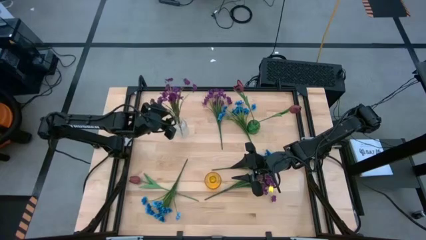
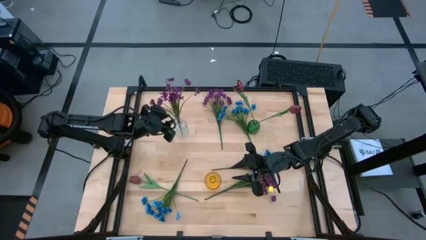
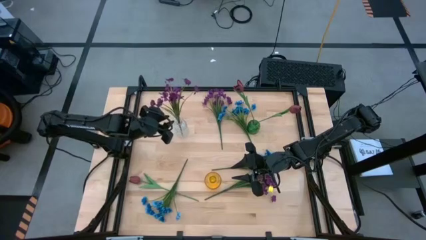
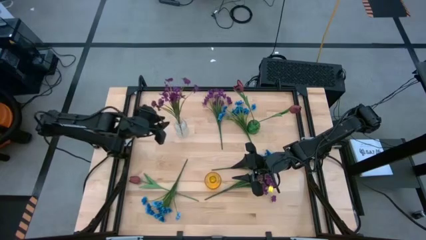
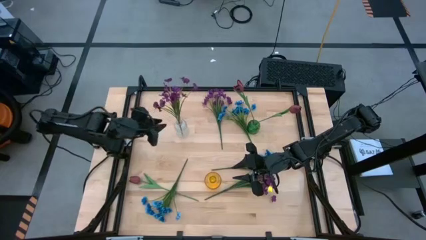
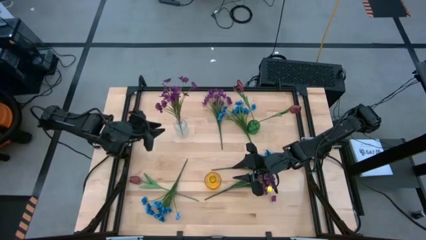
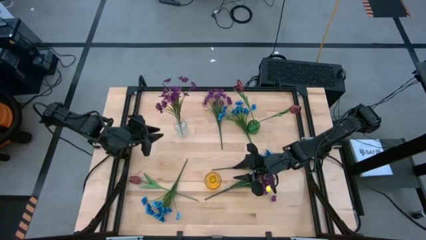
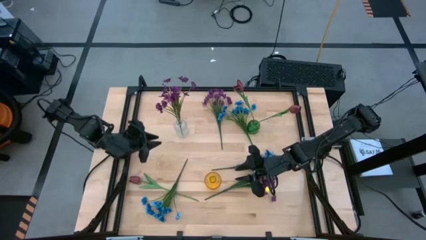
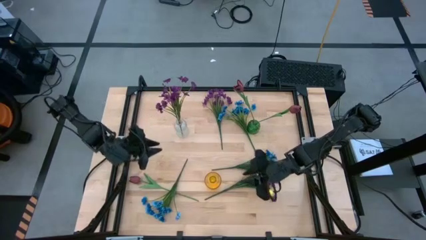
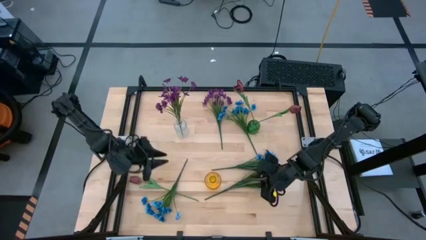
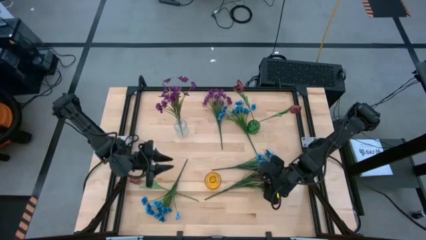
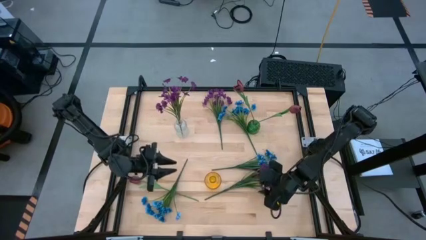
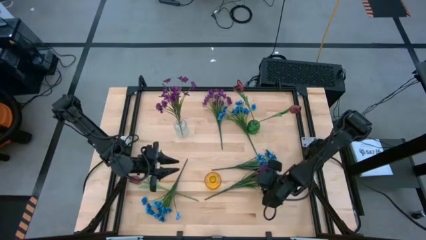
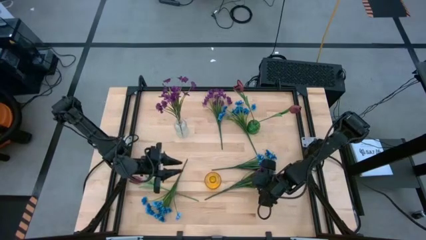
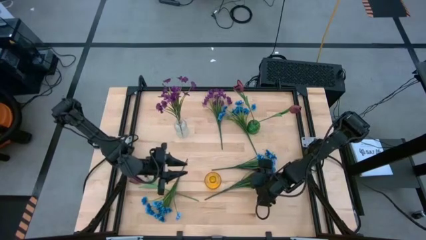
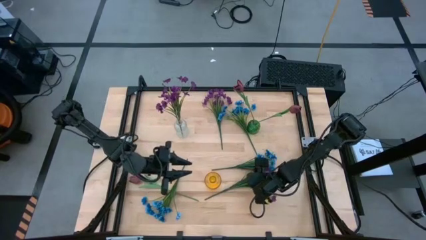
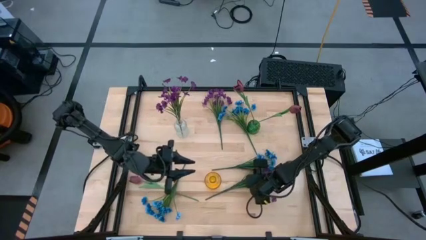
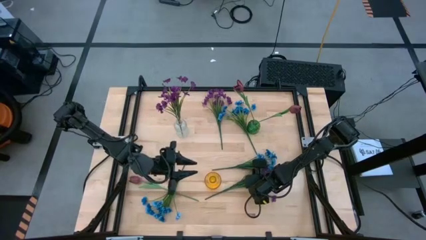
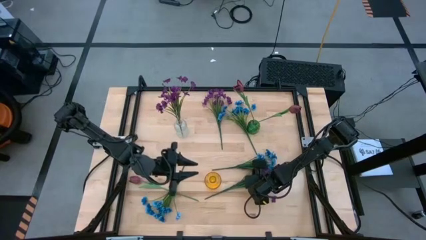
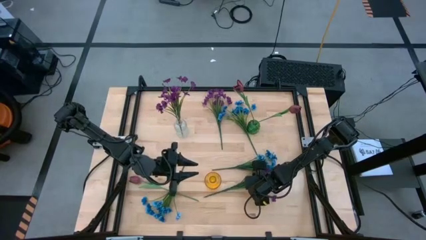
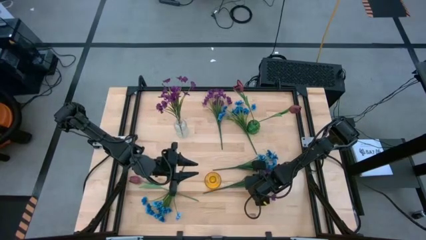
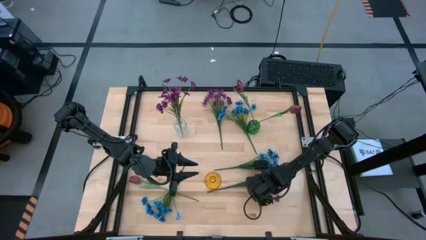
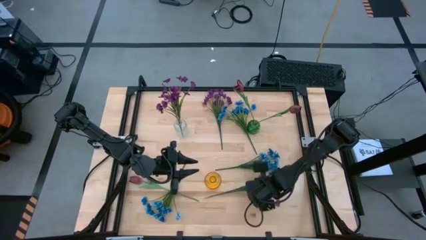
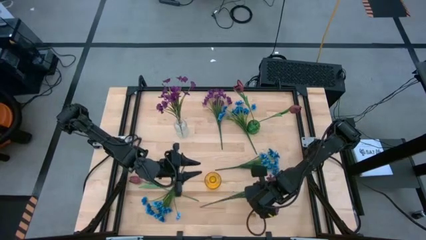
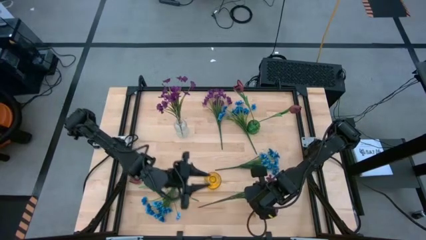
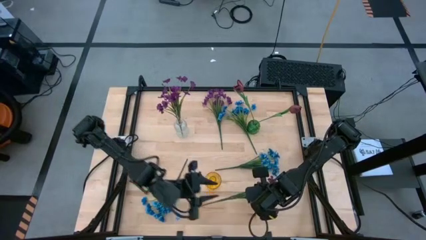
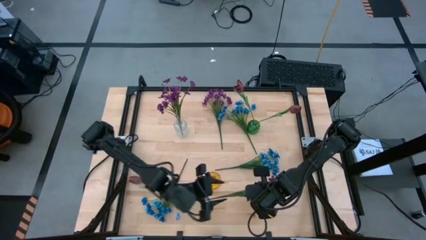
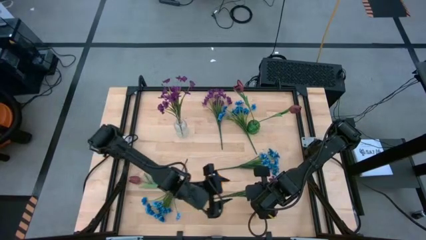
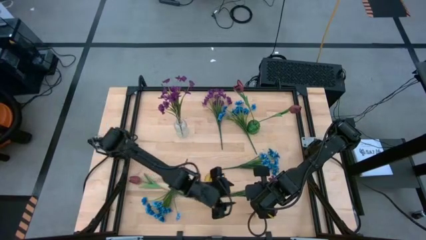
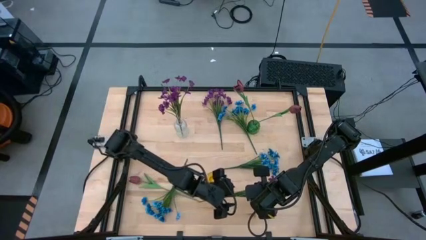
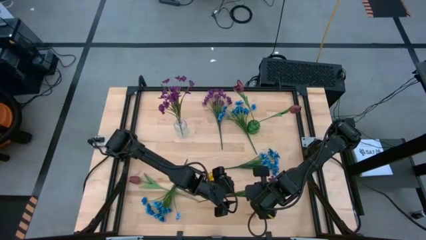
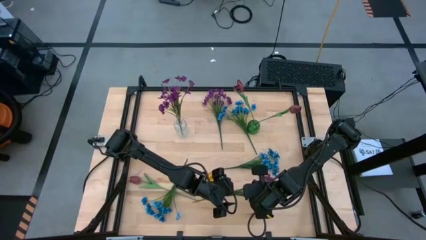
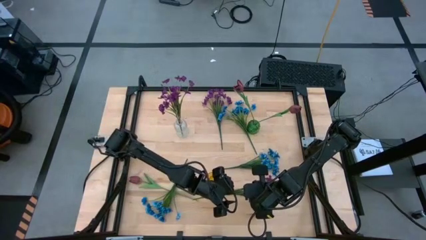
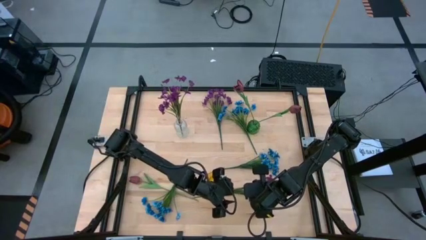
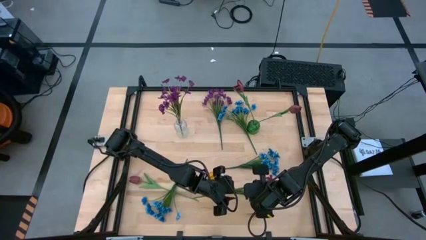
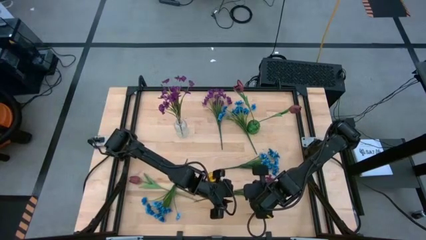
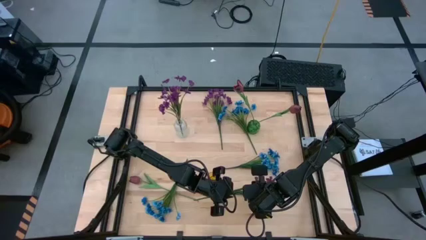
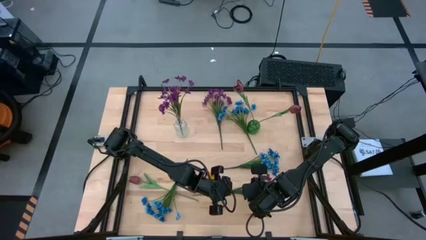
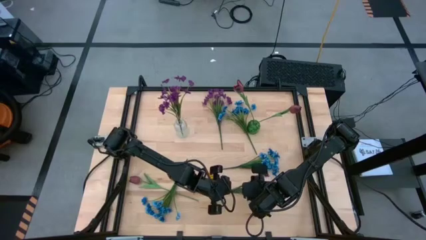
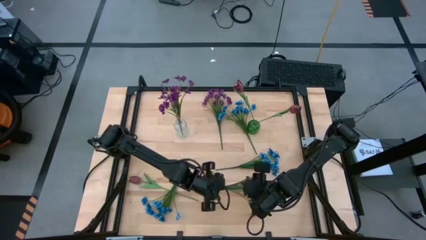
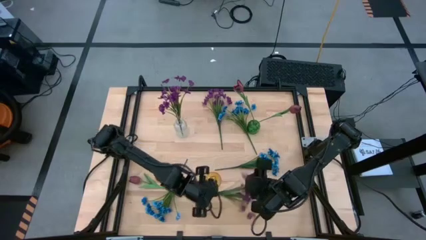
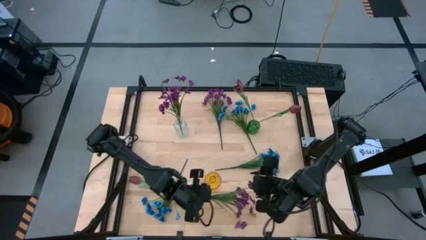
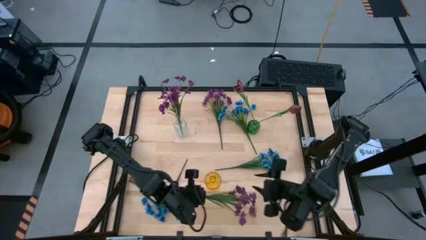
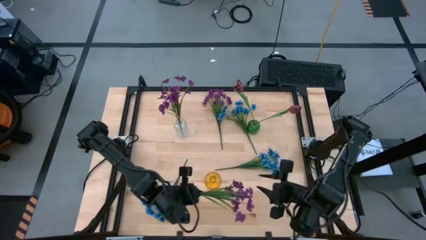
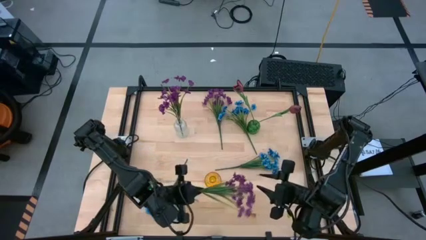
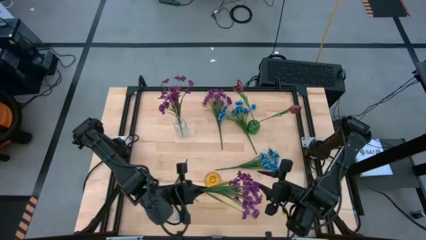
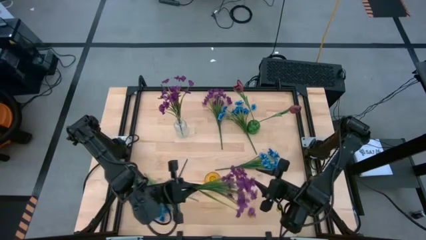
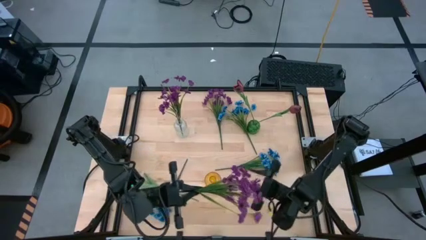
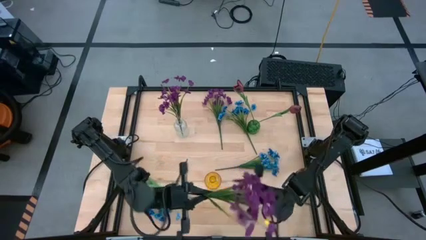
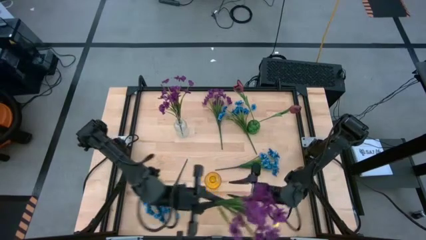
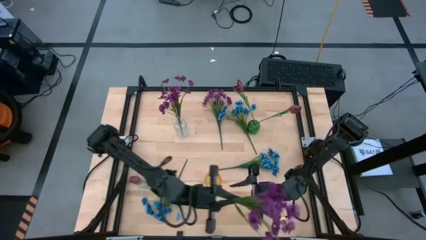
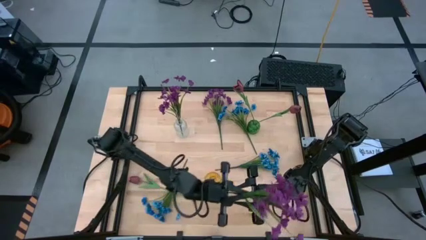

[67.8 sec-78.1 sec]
Task: Sort flowers into vase by color
Put the bottom violet flowers into the transparent vase

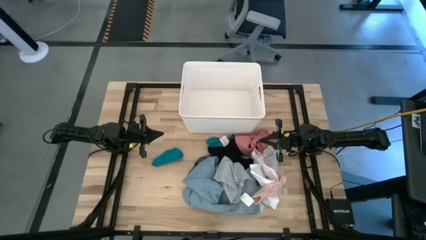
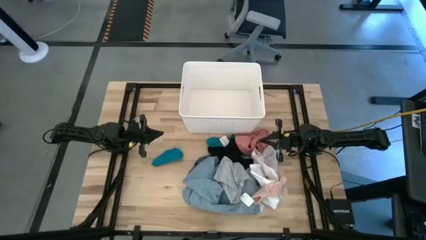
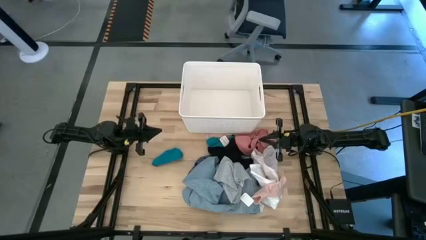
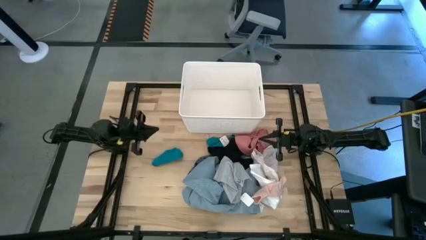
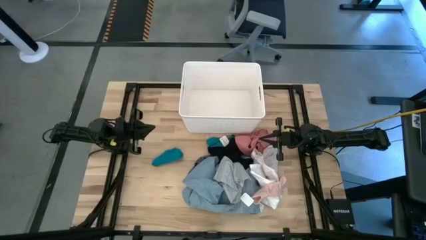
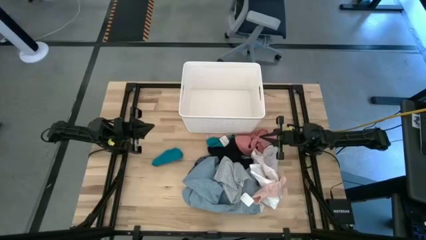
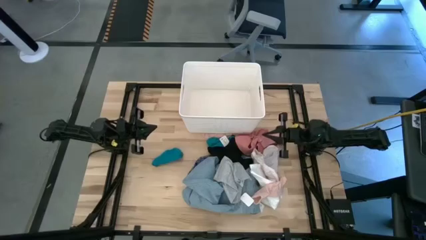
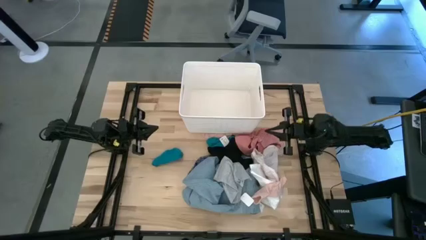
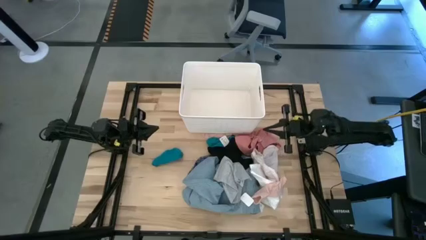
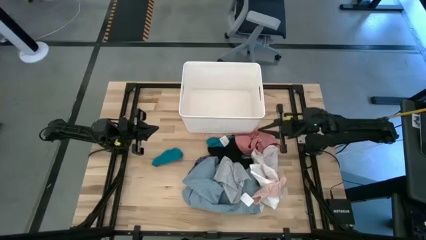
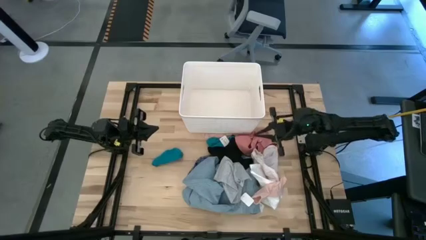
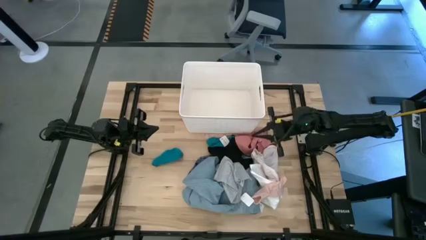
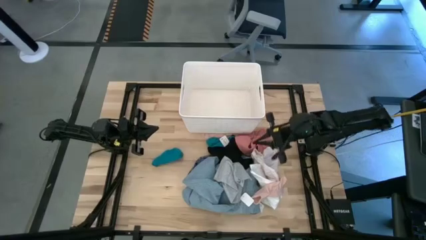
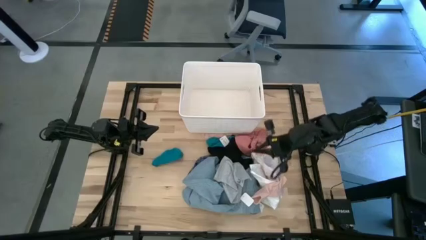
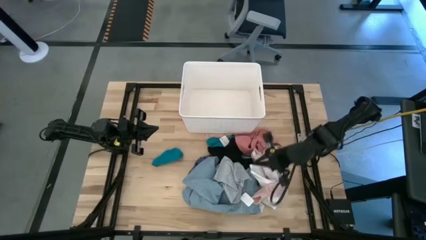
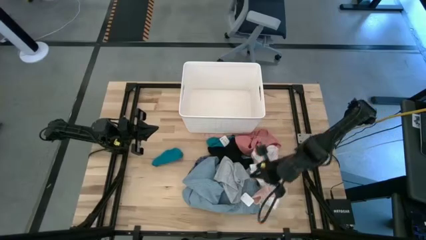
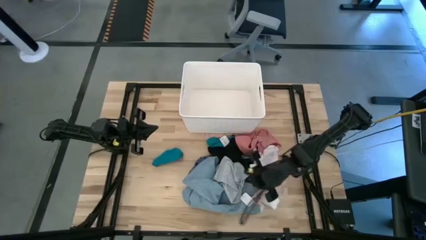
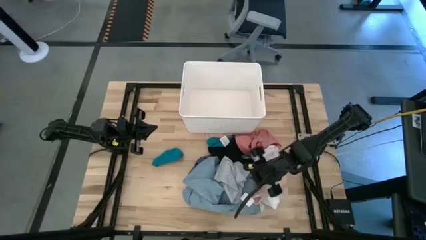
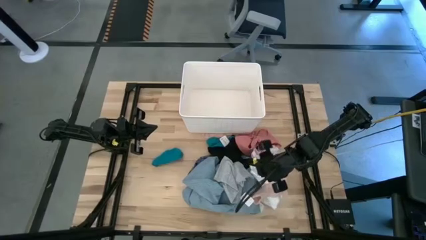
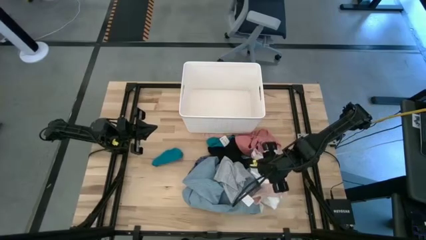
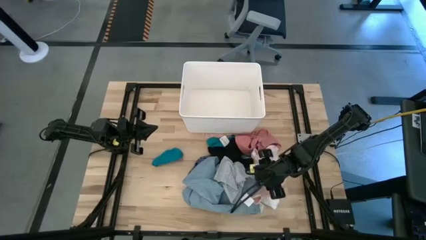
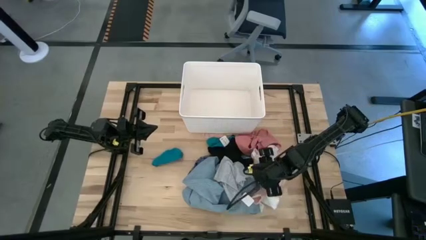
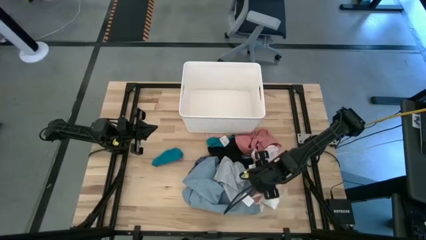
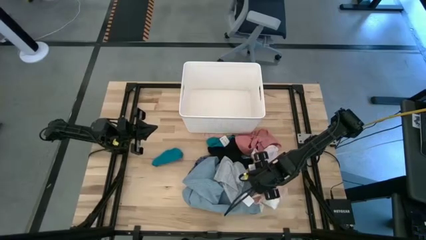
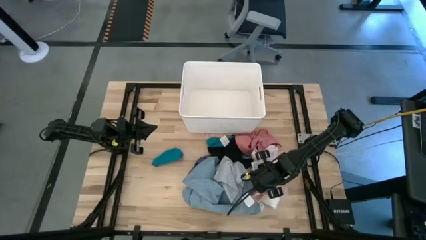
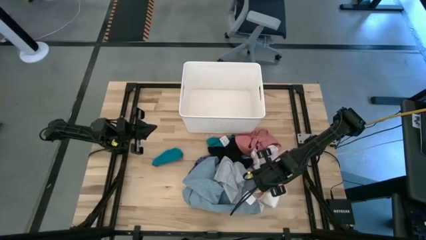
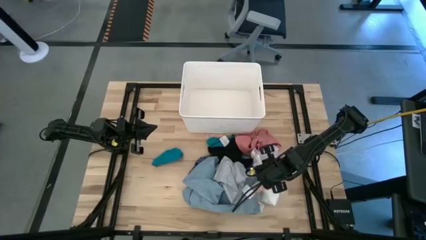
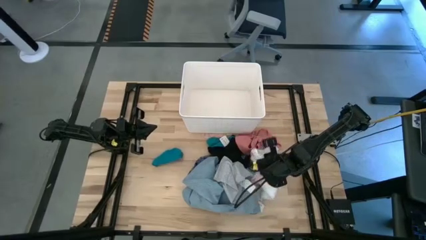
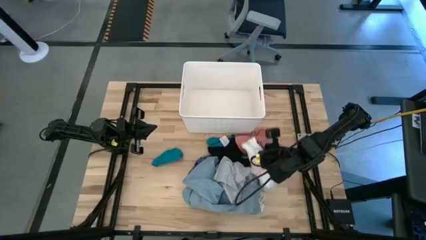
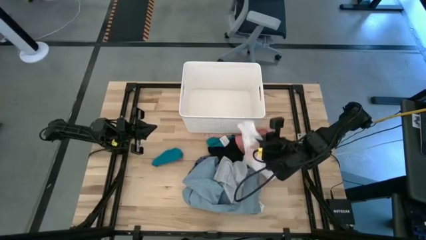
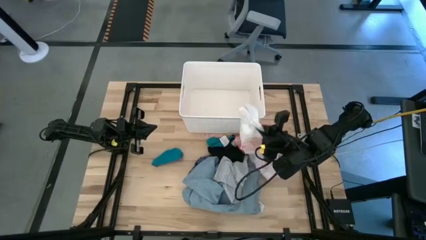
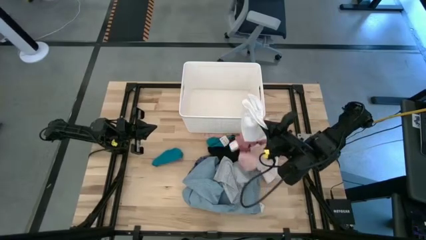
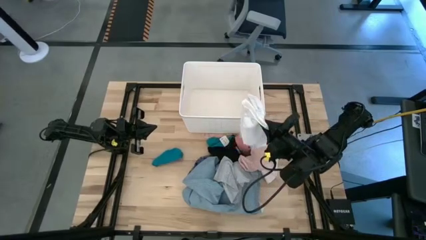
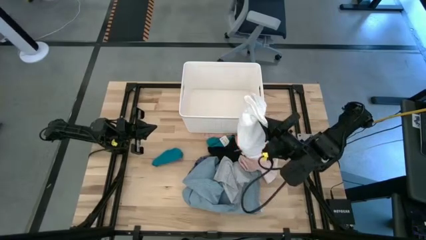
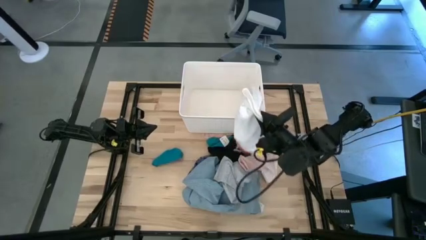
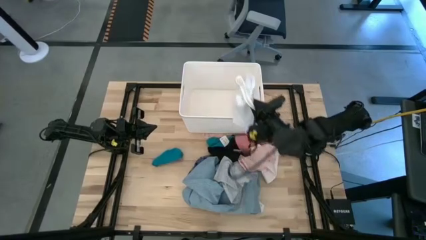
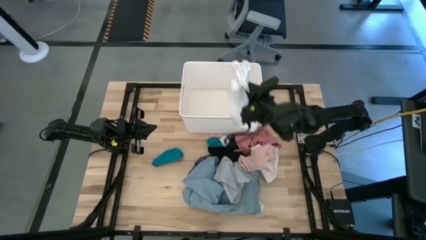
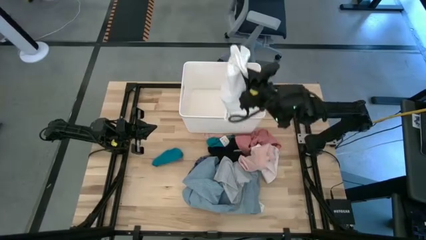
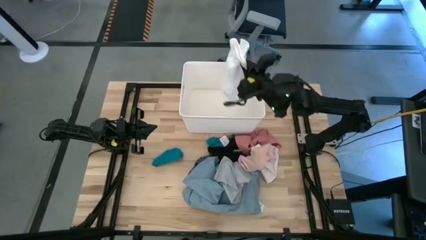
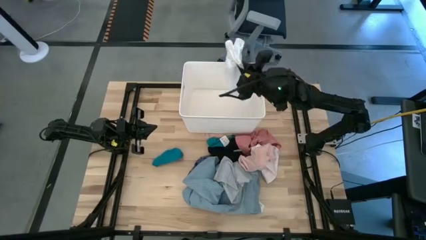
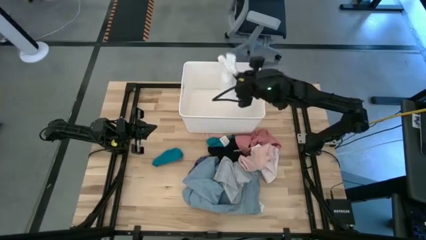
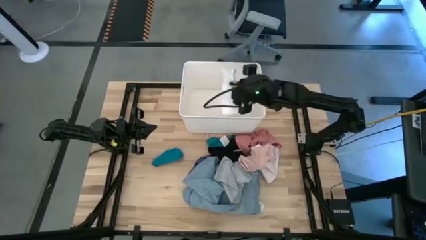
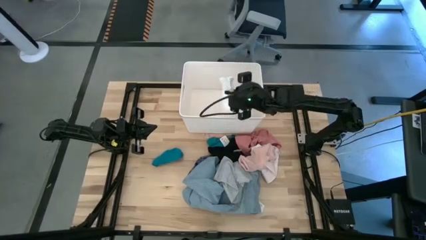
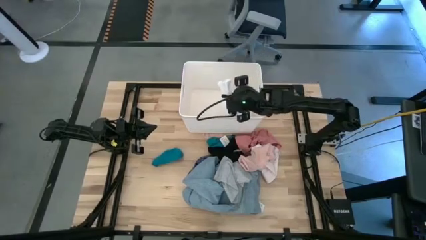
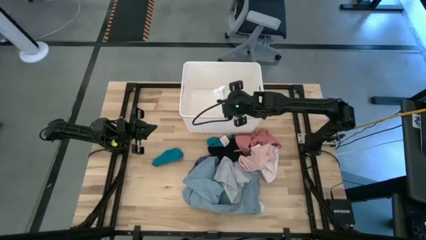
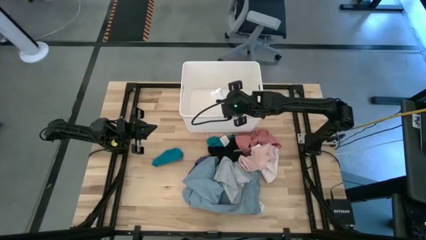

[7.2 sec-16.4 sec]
Task: Sort clothes
Put the white shorts into the white laundry bin
